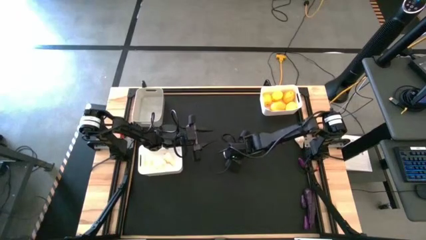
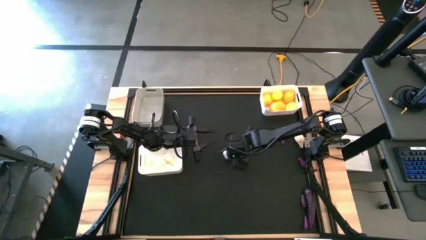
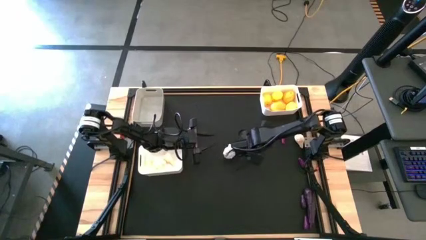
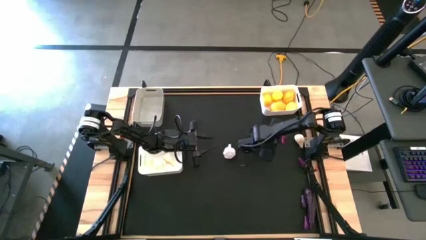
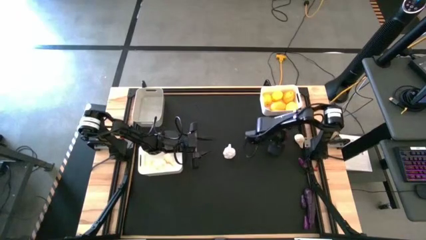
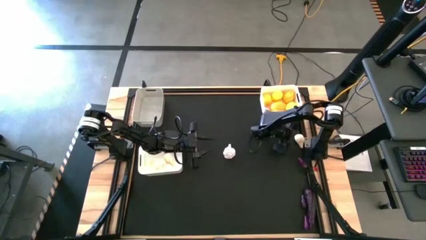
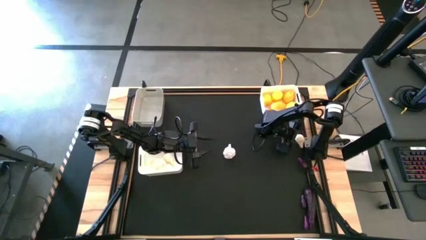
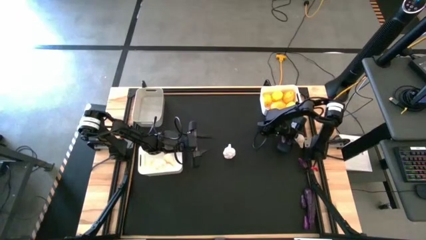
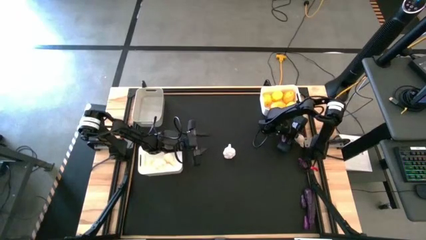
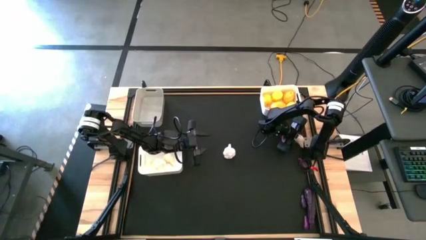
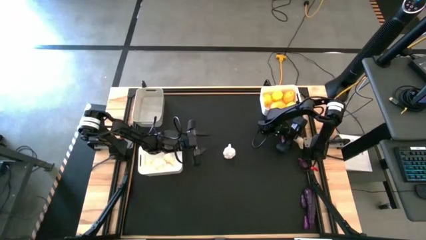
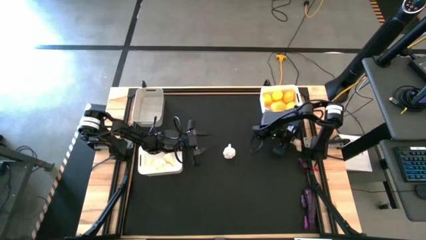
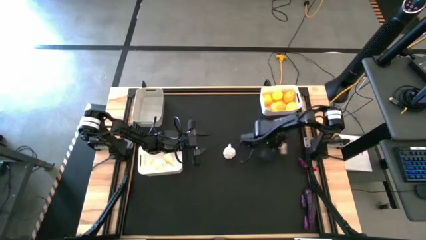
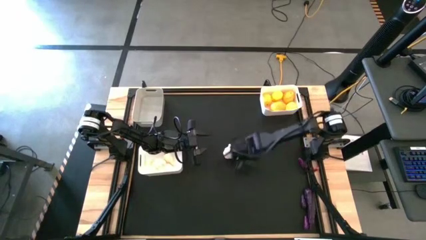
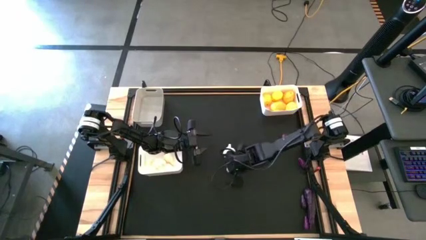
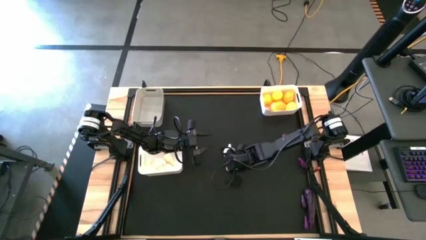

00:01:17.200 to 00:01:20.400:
Task: Sort produce into baskets
Move the white garlic to the center of the table

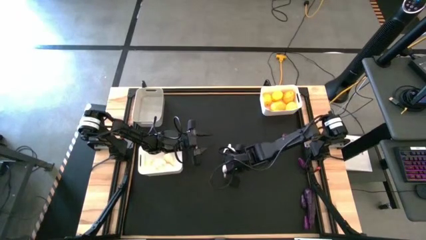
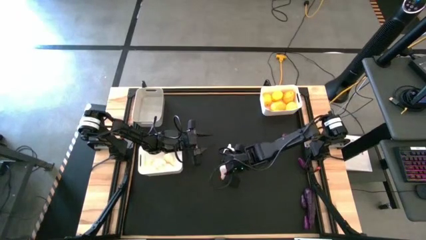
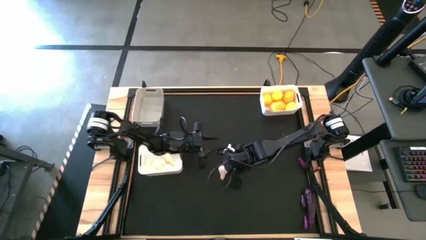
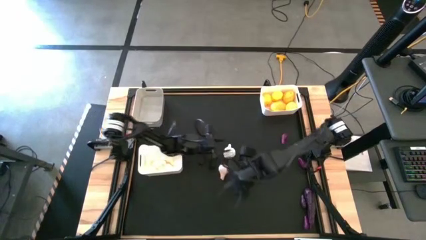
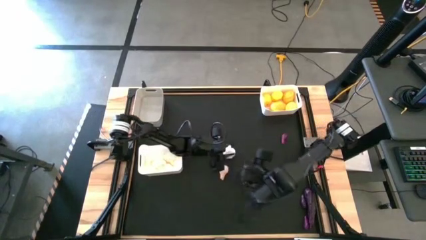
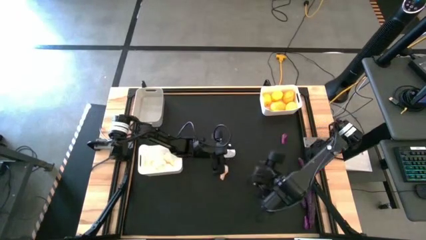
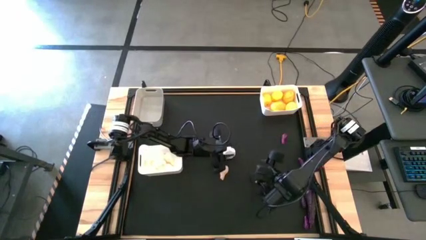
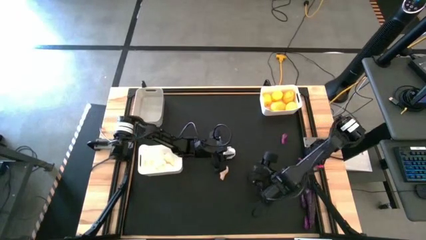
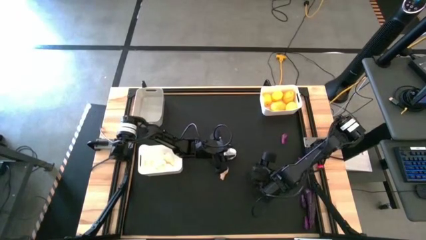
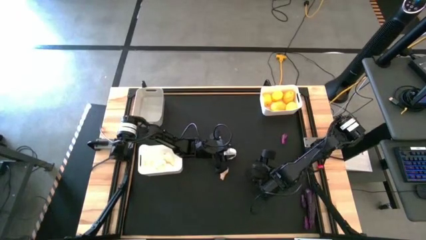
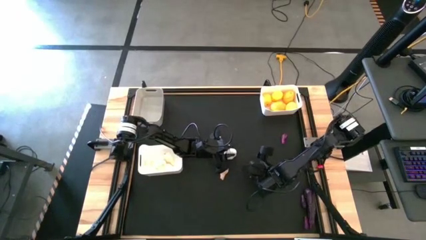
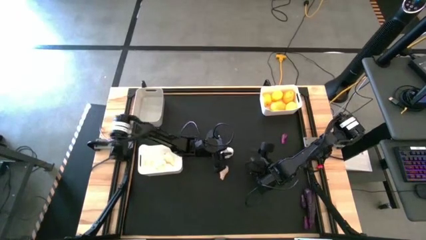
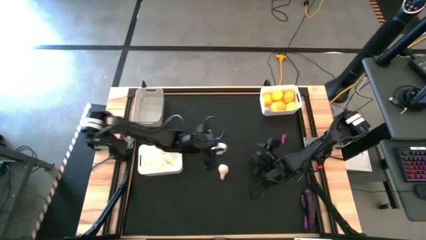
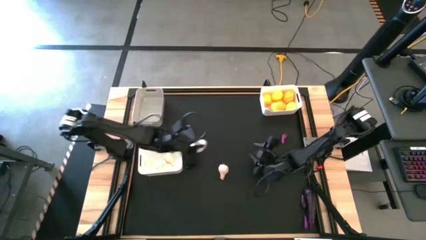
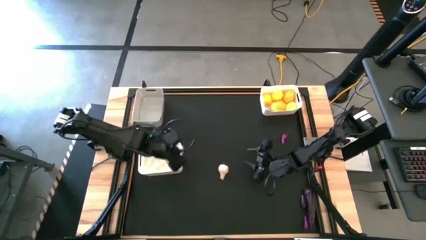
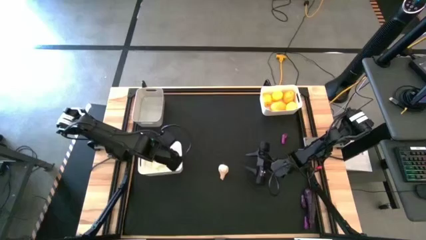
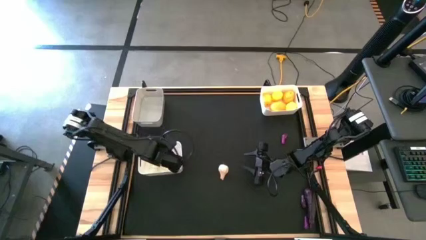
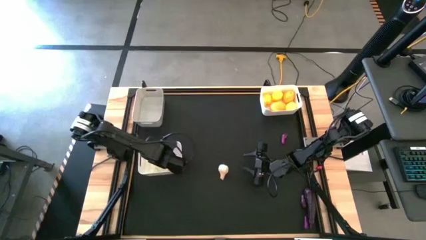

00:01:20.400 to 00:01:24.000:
Put the white garlic into the bottom white bin

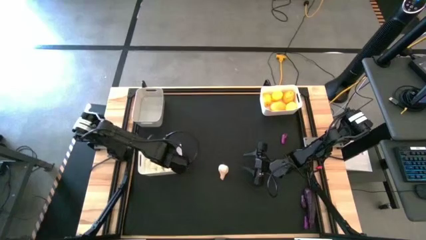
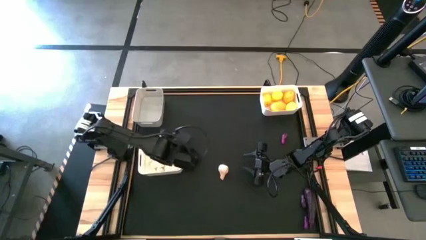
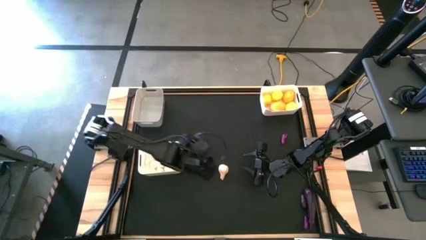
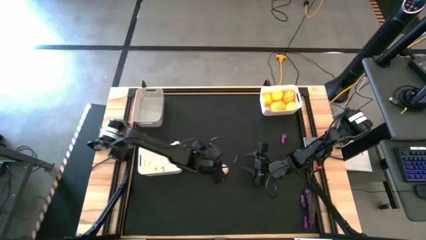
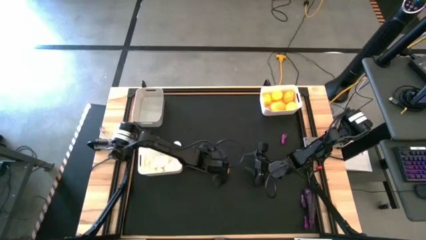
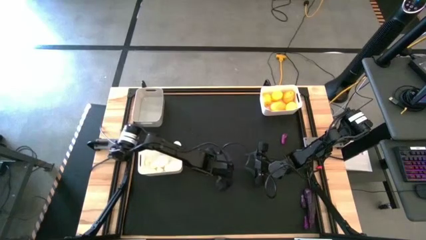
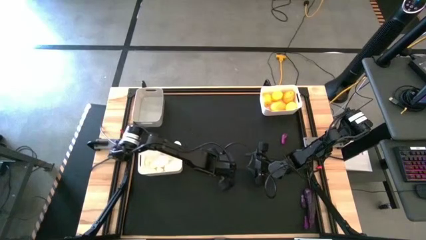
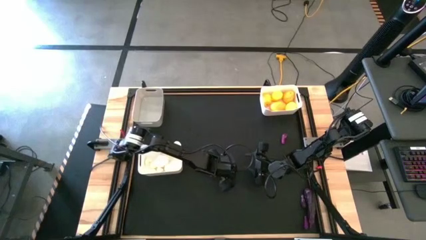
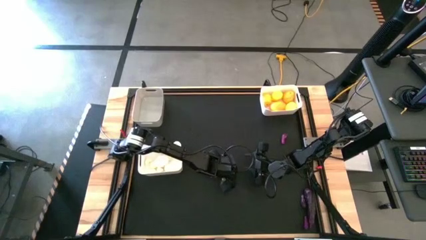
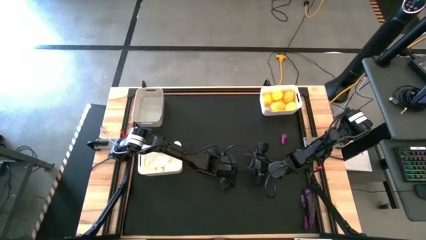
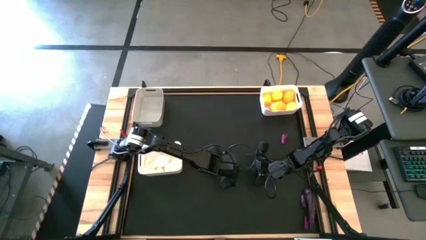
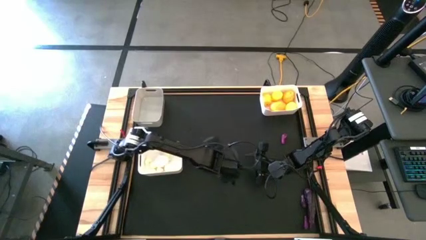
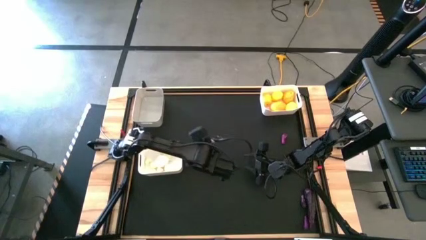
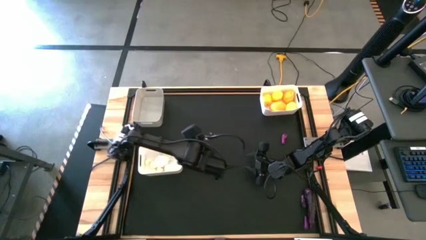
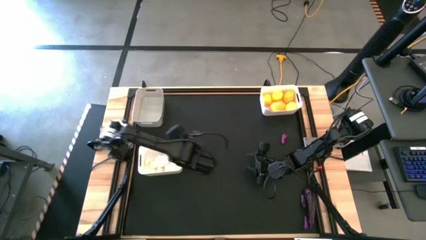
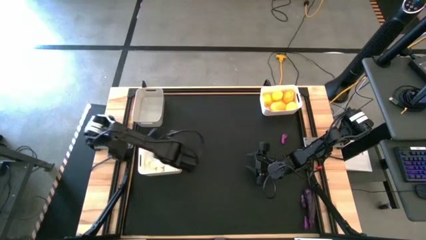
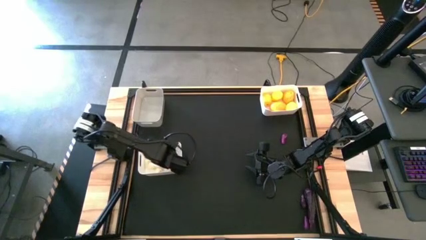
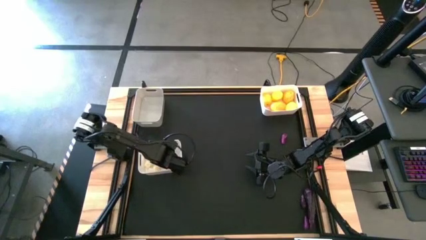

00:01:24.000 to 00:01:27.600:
Put the white garlic into the bottom white bin

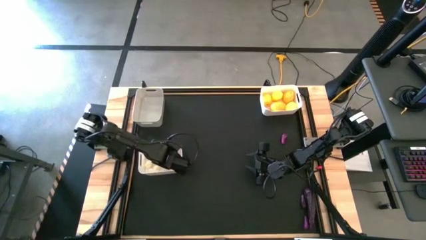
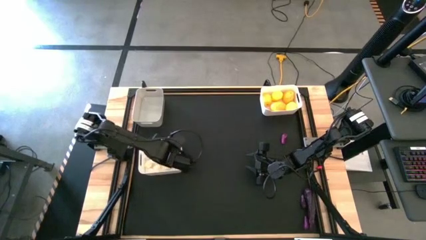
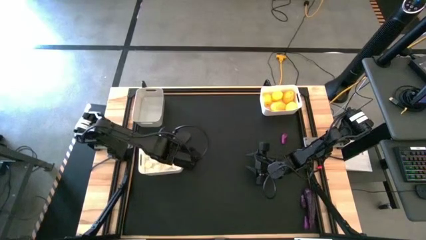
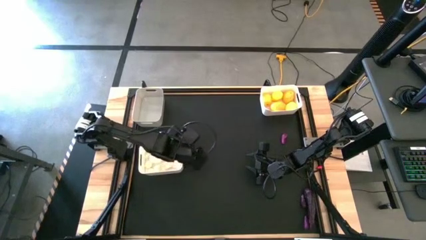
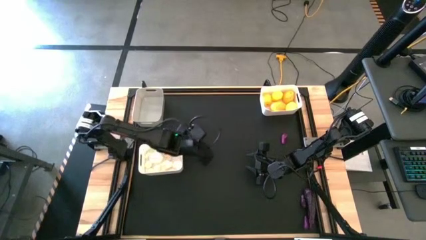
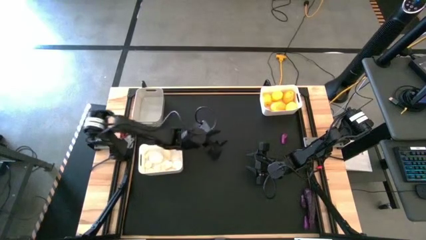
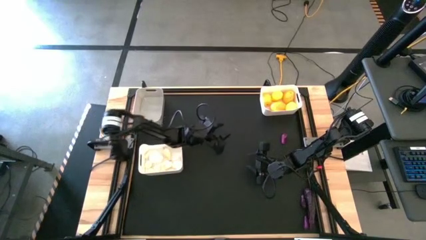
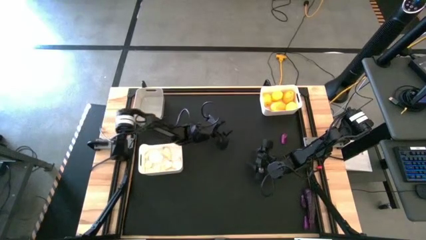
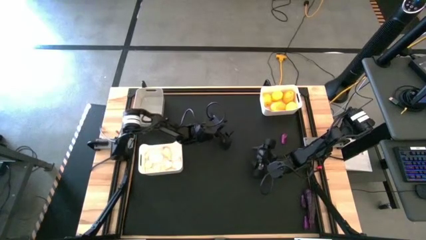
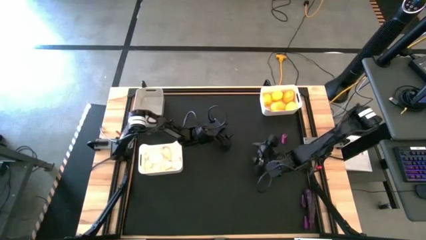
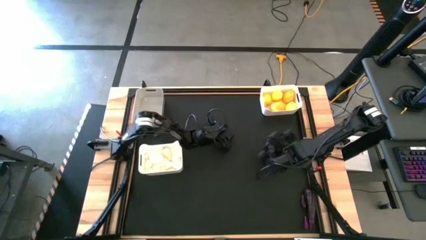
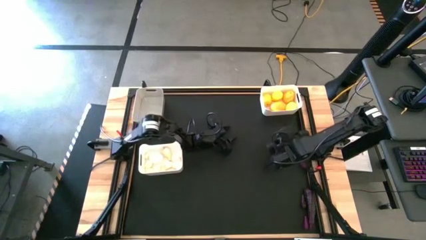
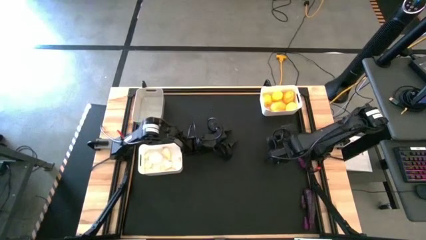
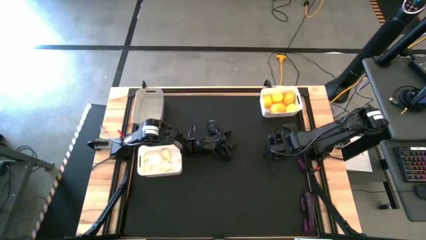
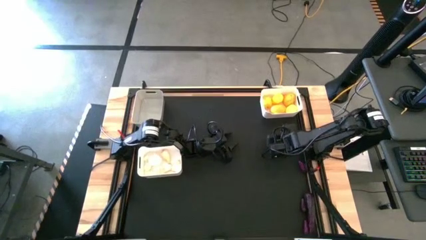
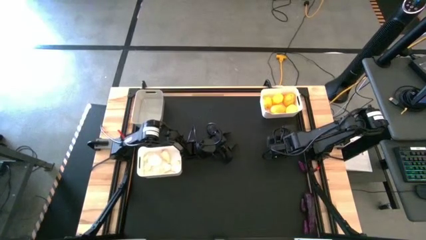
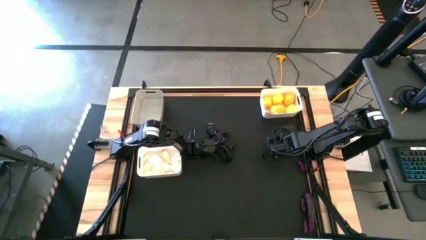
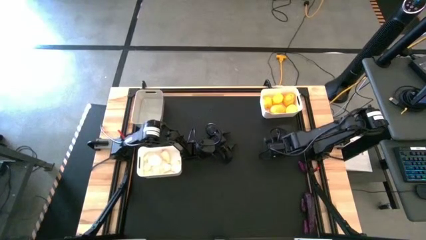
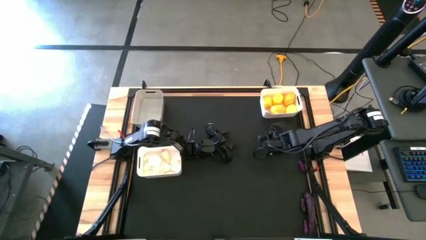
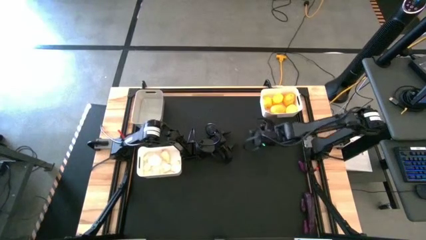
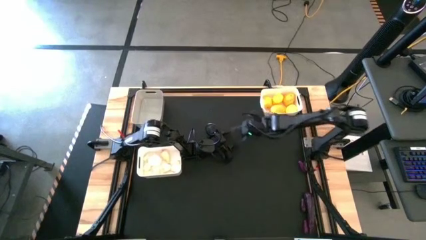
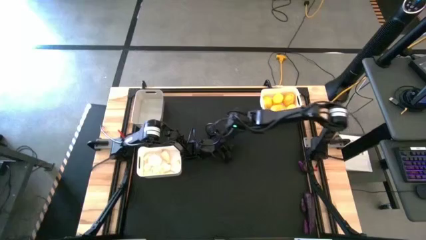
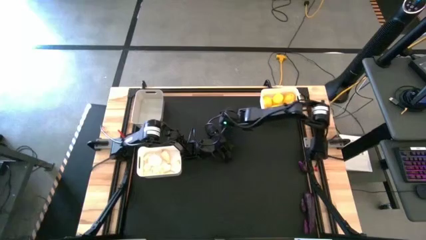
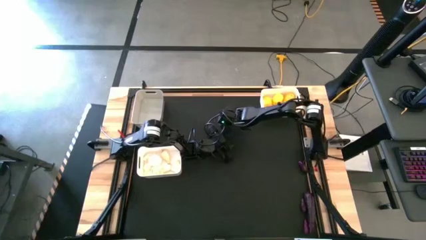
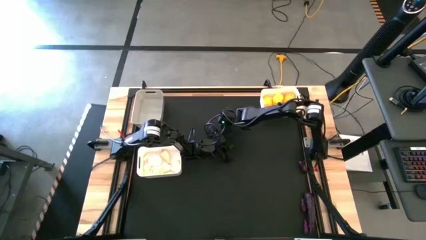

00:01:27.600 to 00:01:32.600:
Move the violet eggplant to the top center of the table

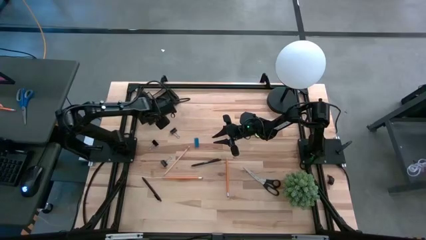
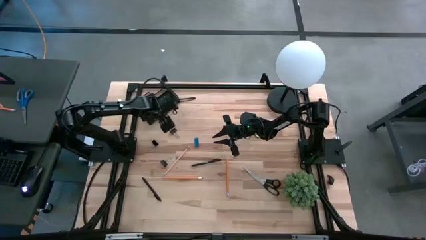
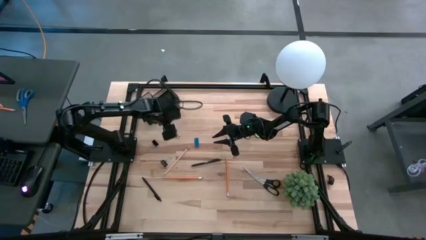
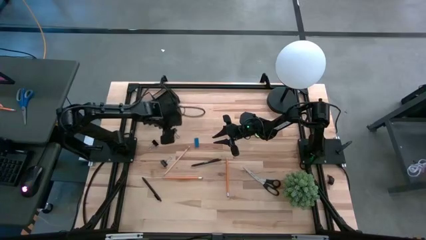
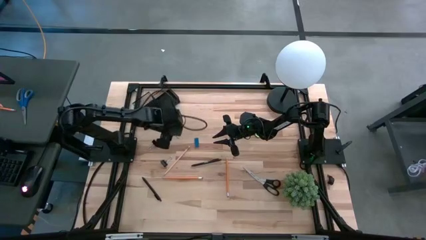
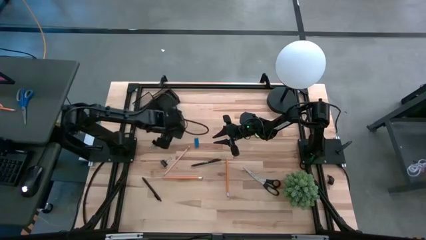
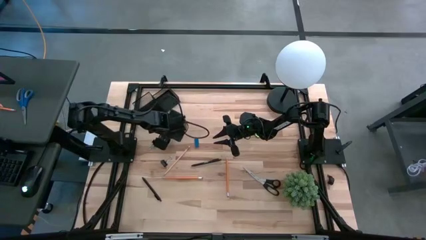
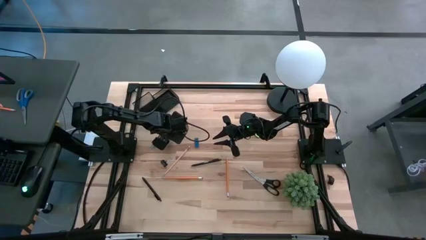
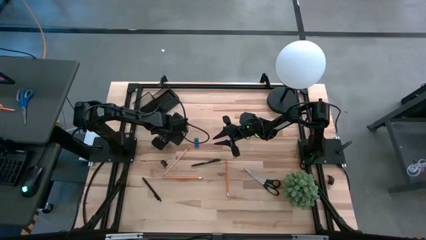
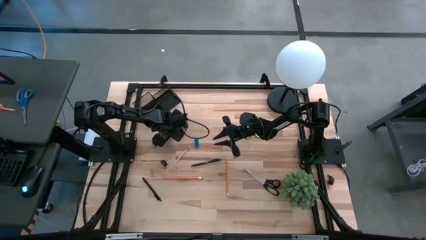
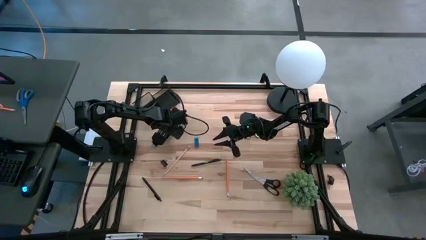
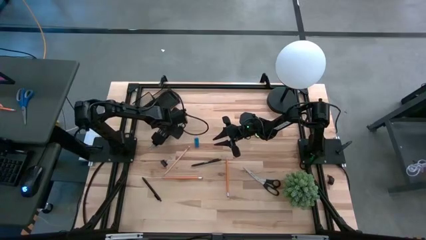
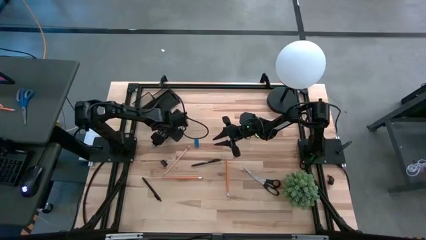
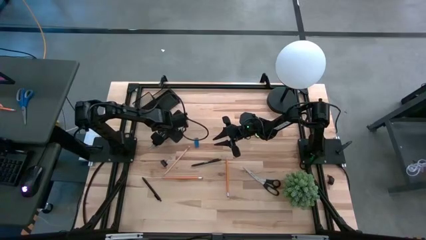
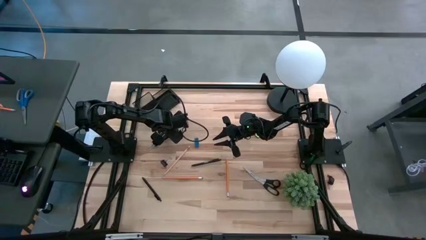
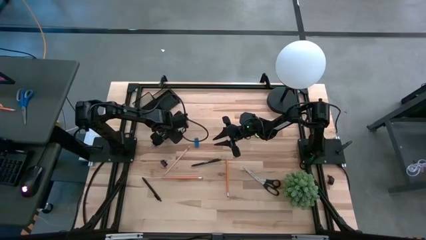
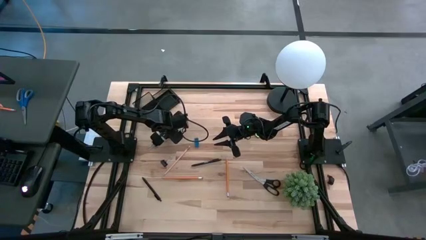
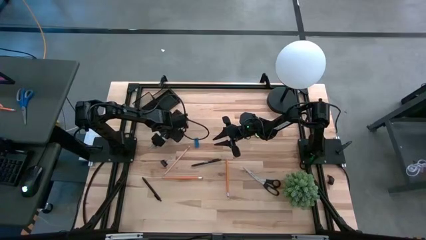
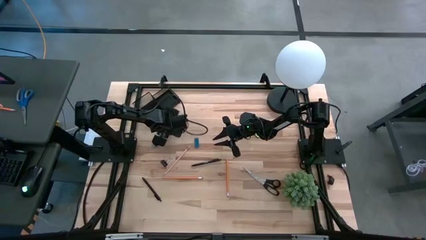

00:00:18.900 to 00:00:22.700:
Task: Pick and place office supplies into organizer
Put the black binder clip into the bottom left section of the desk organizer
